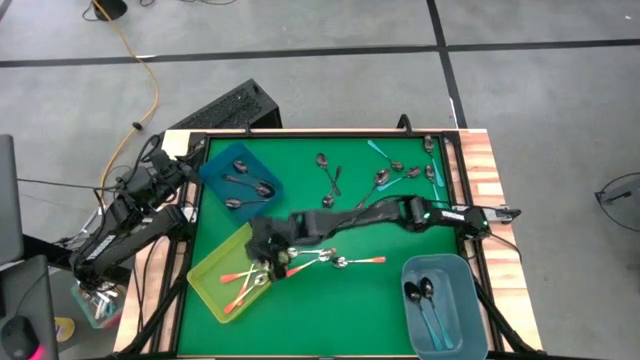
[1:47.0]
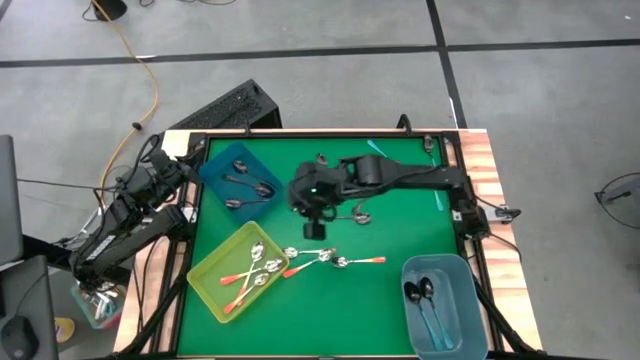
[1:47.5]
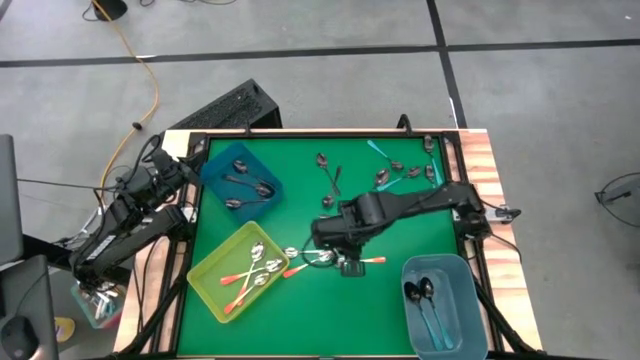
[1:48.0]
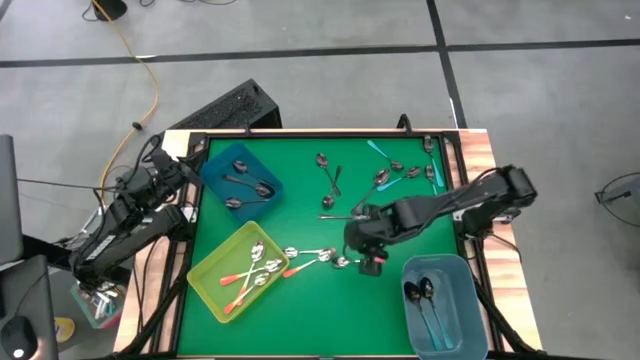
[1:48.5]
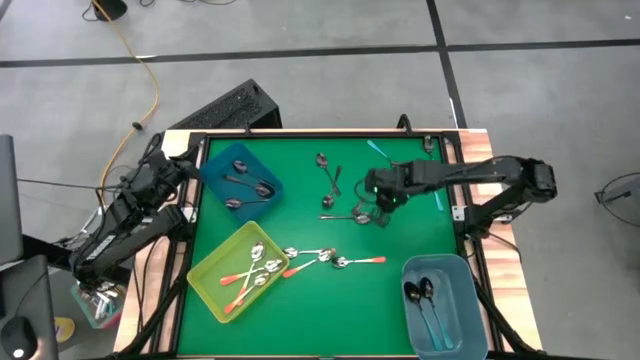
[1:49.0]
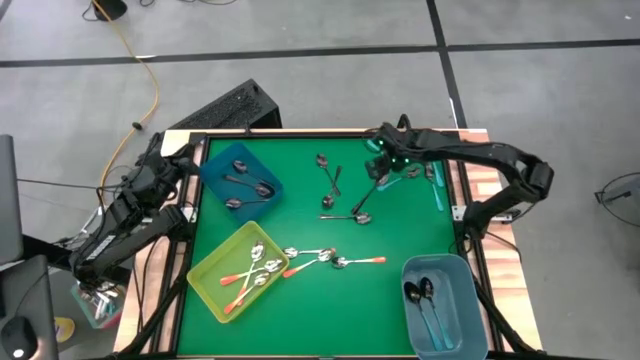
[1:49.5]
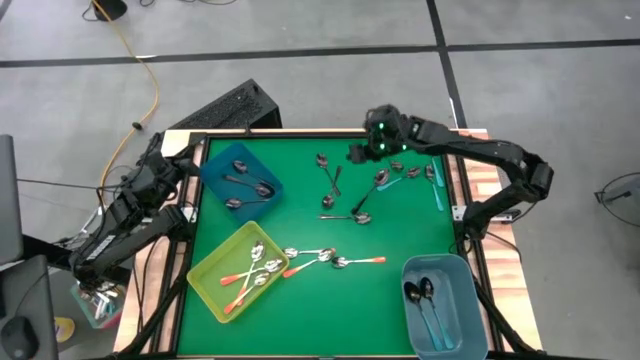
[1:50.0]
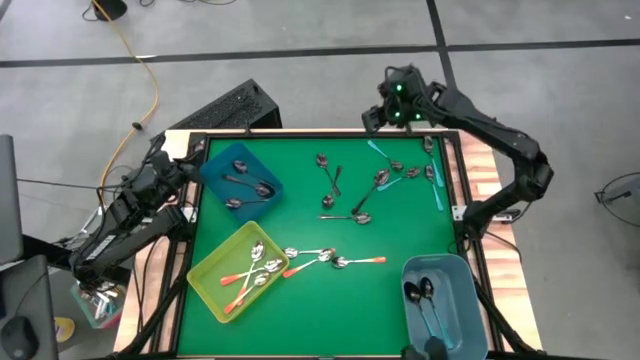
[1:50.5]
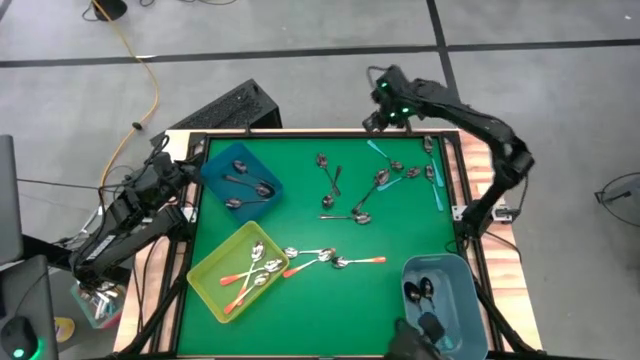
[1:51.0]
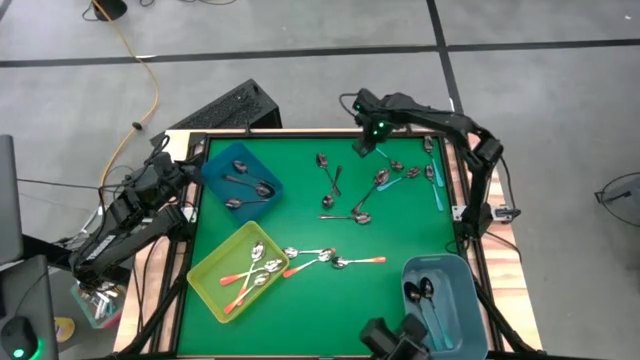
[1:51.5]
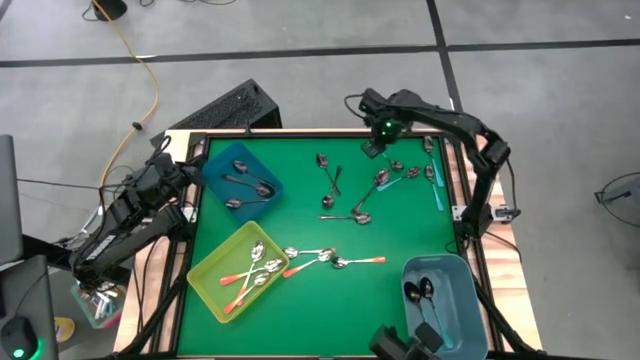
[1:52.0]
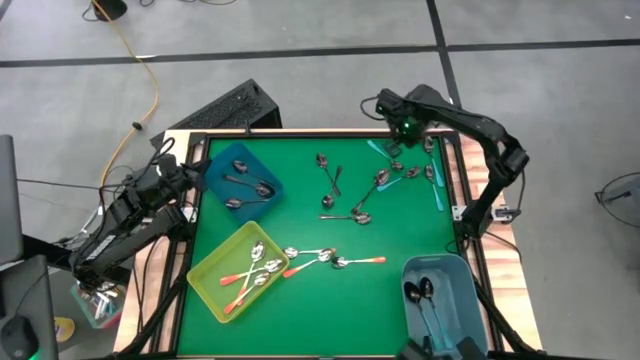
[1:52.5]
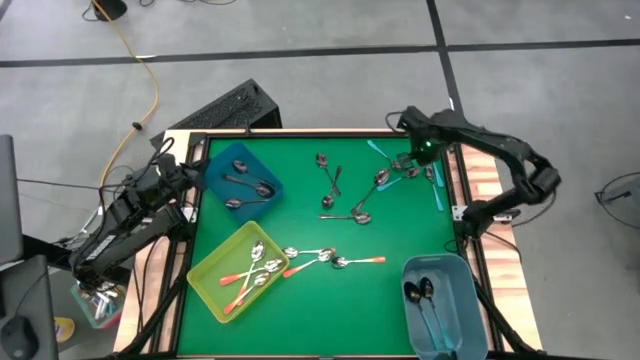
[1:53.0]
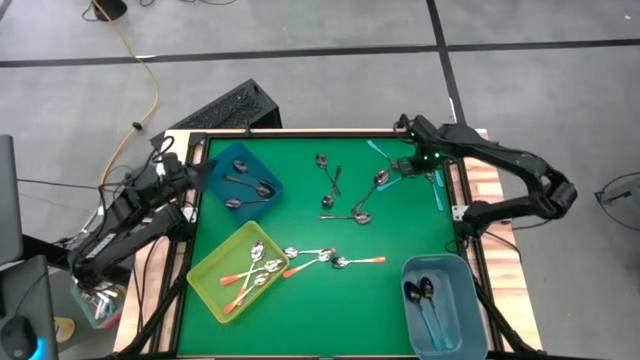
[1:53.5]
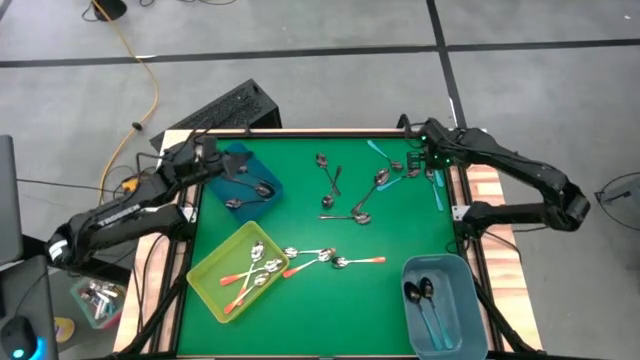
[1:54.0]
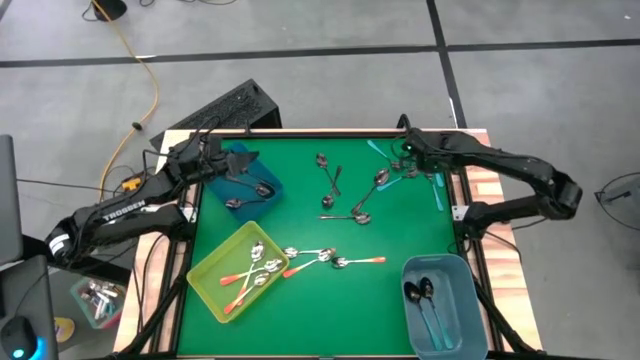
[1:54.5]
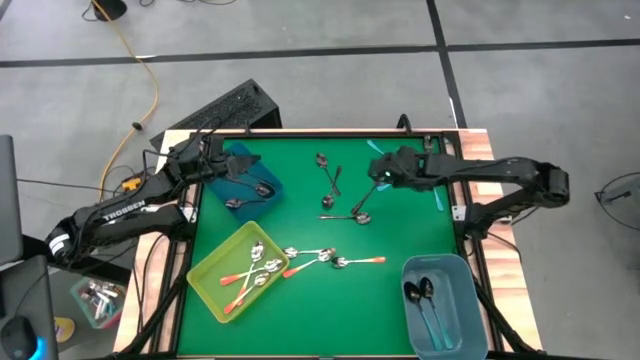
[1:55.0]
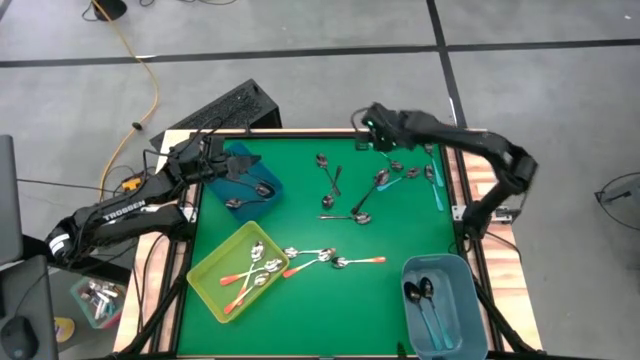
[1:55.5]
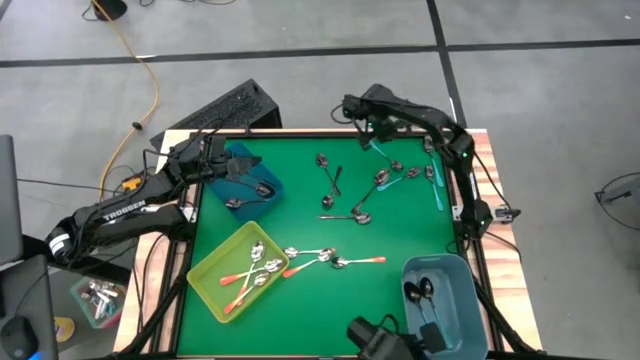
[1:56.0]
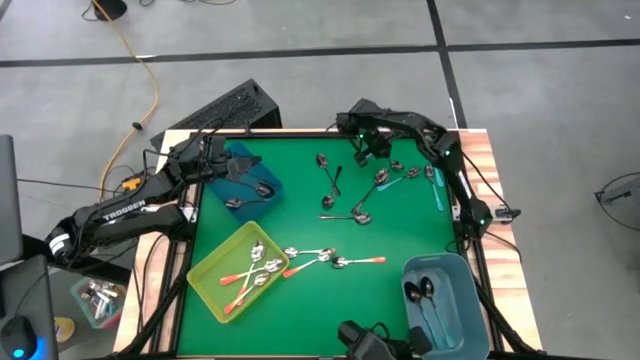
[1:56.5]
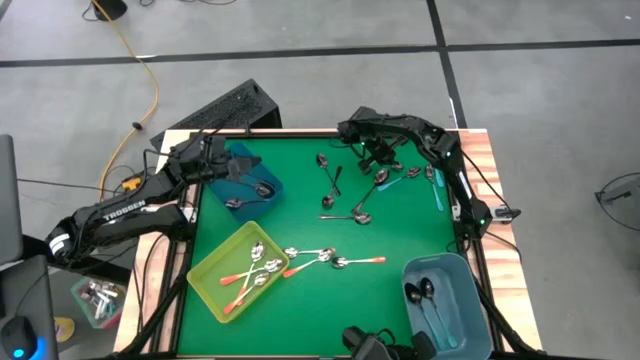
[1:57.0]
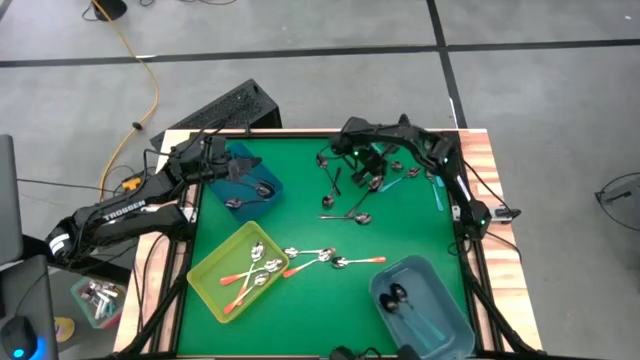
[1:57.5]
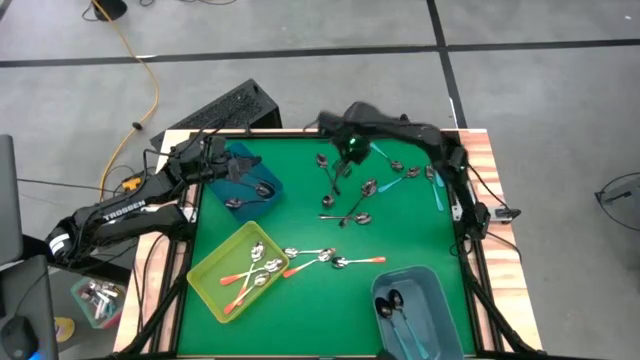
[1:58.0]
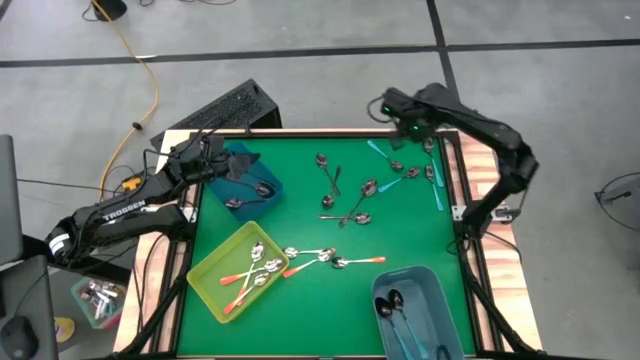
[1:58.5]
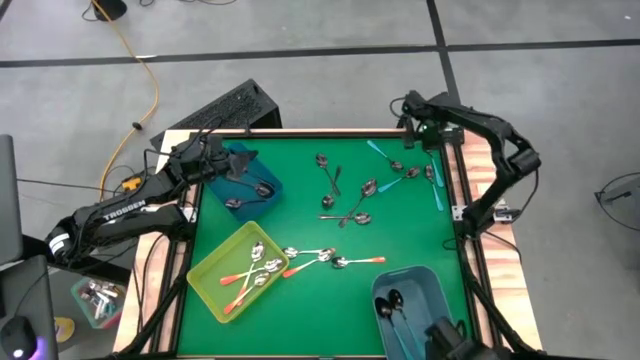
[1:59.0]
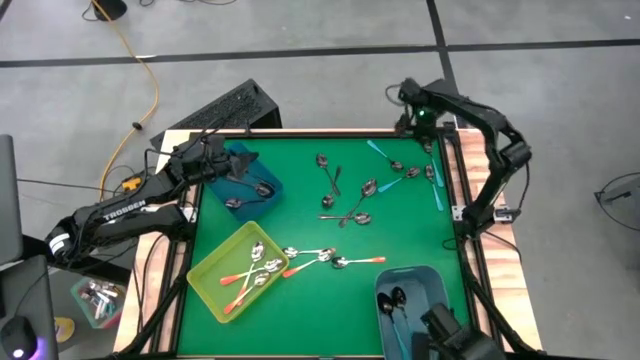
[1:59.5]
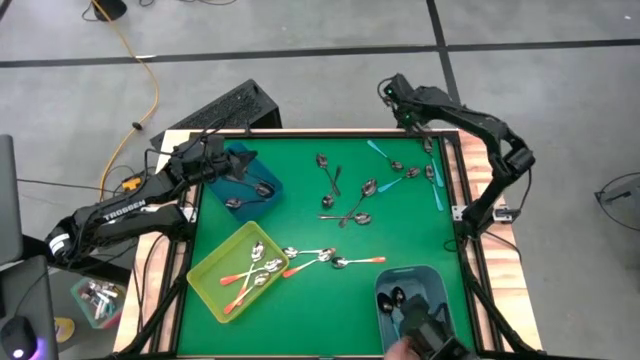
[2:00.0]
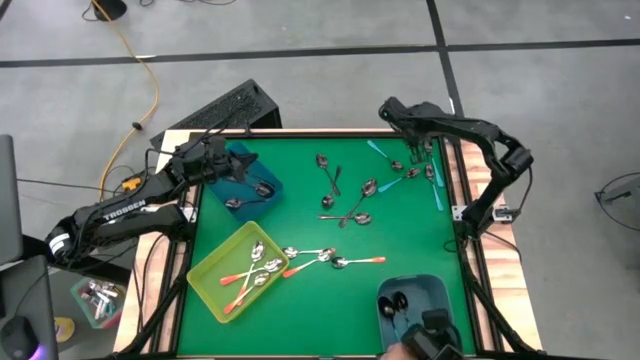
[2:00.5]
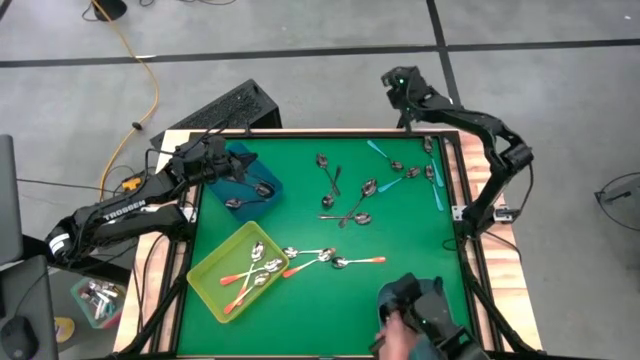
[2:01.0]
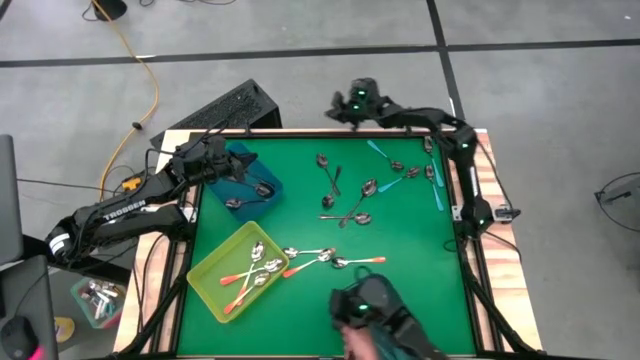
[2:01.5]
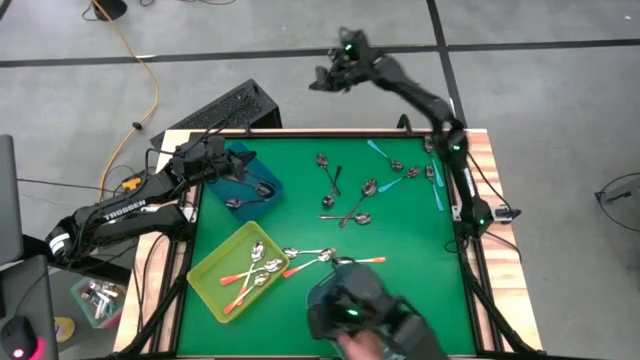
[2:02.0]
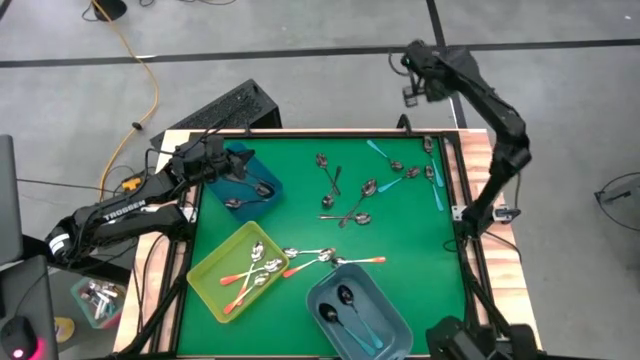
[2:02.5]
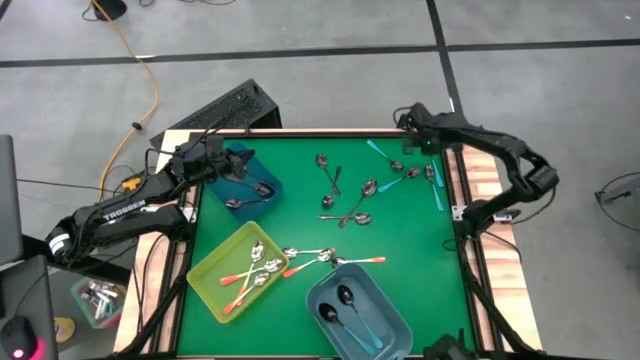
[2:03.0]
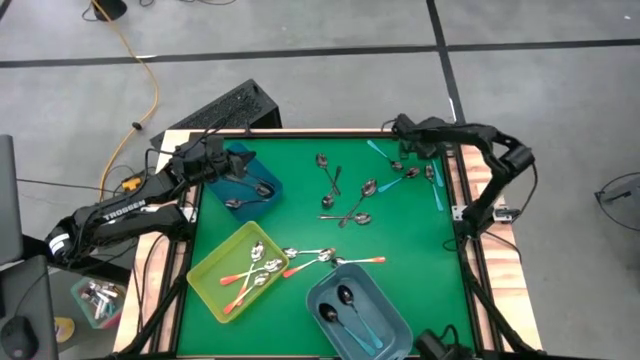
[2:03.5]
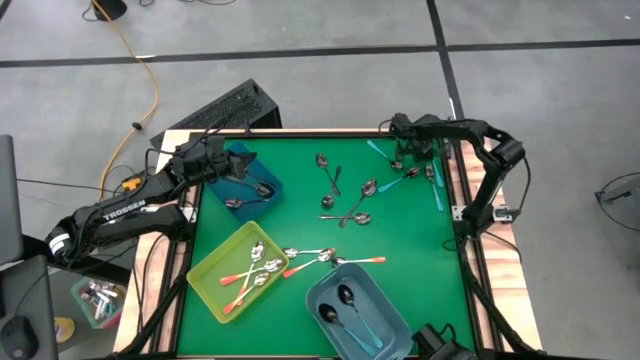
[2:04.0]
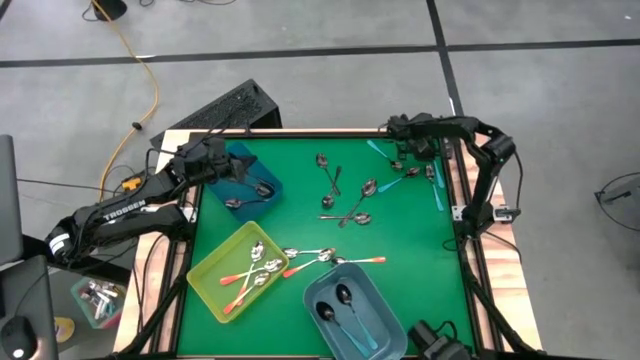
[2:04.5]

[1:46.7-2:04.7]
Task: Sort silverware by color (type)
Put the blue spoon into the blue bin

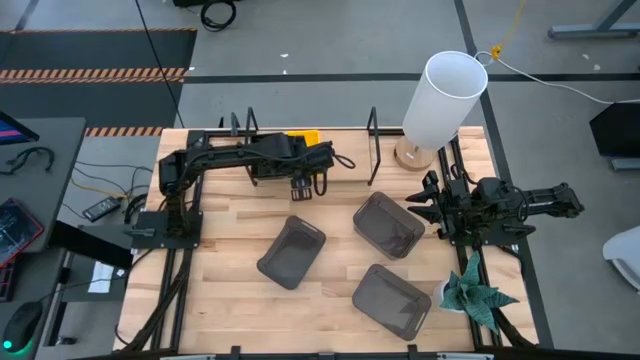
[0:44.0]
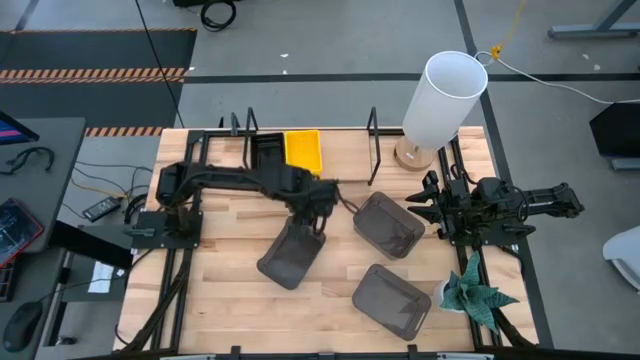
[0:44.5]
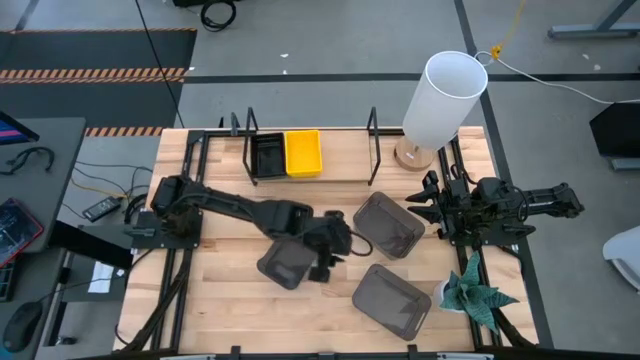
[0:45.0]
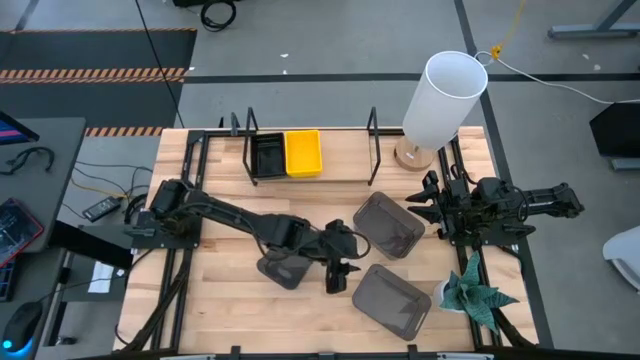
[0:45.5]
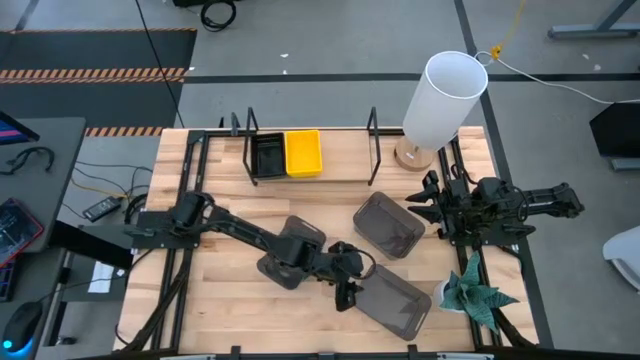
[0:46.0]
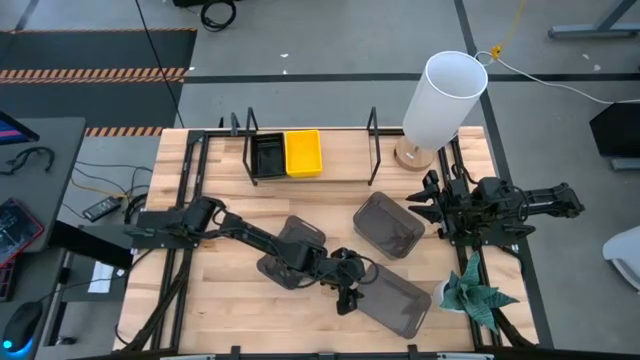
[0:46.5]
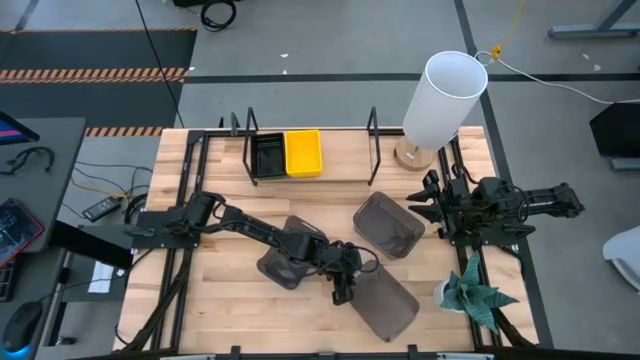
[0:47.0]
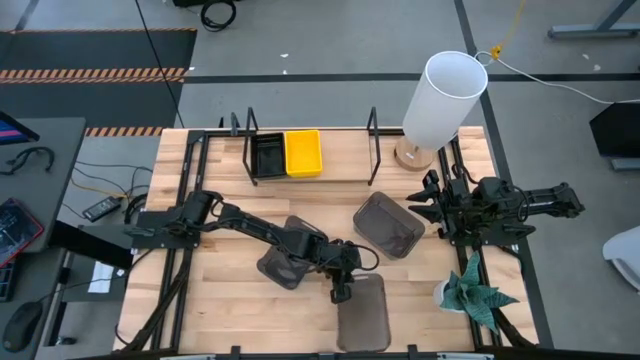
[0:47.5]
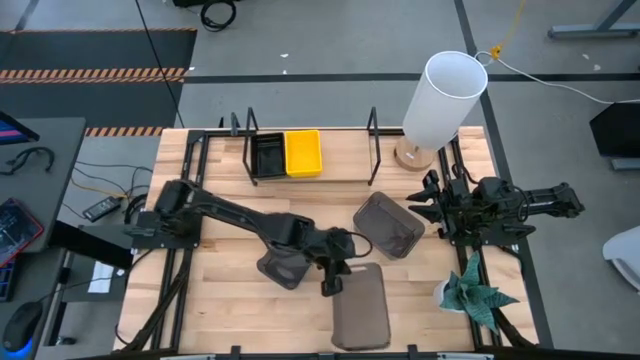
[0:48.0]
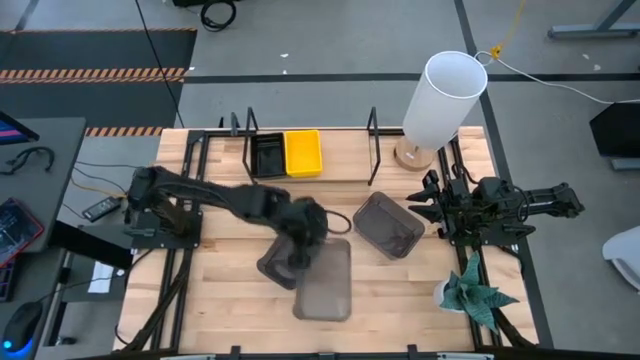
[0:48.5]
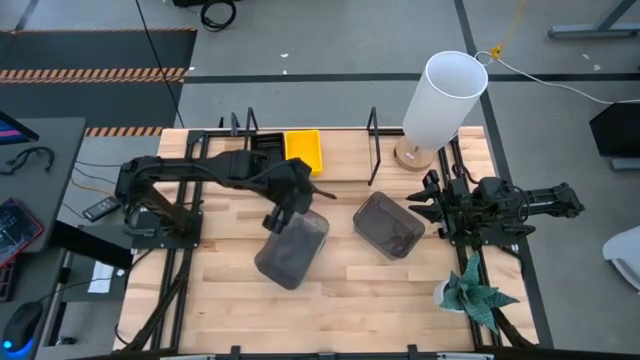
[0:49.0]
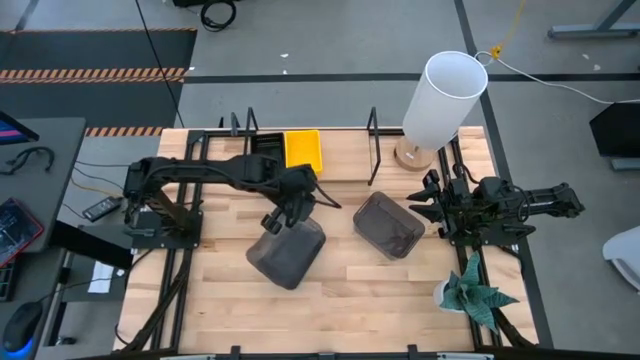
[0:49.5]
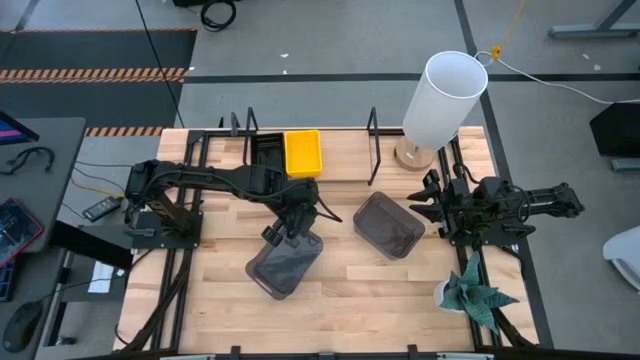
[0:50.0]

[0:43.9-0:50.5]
Task: Stack baskets on shelf by color
Stack the bottom black bin on top of the top left black bin
